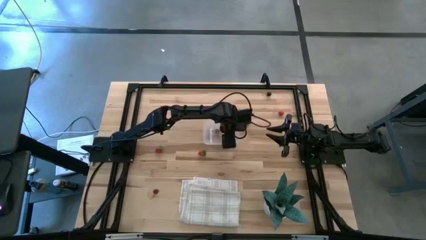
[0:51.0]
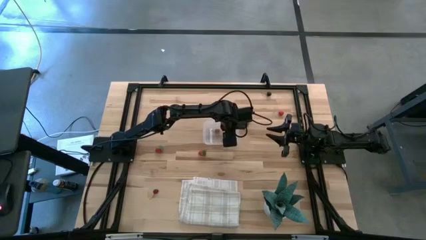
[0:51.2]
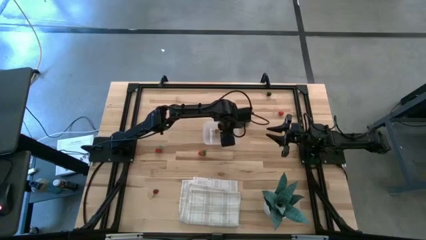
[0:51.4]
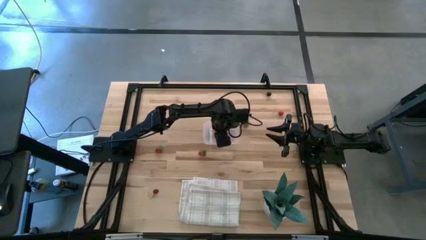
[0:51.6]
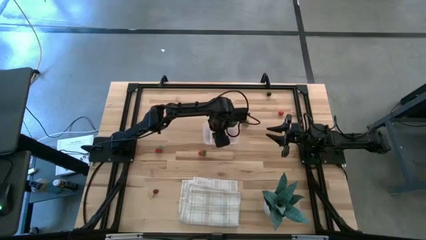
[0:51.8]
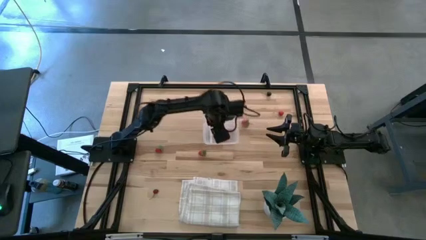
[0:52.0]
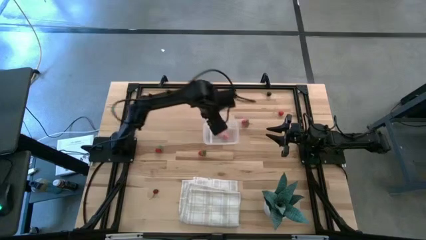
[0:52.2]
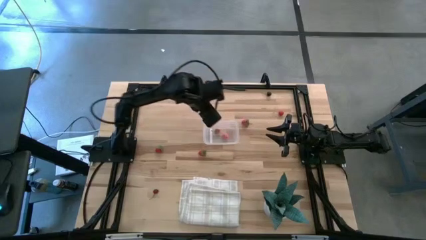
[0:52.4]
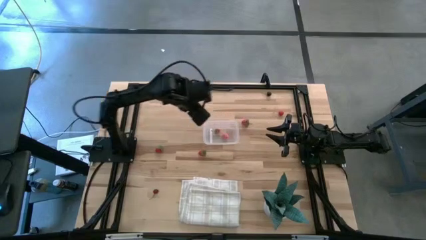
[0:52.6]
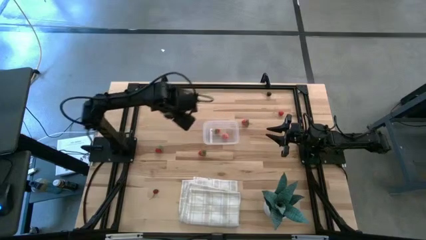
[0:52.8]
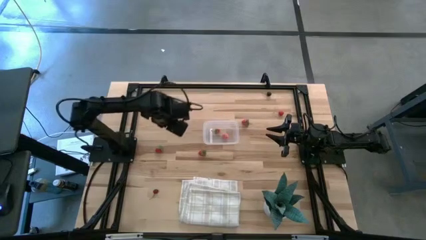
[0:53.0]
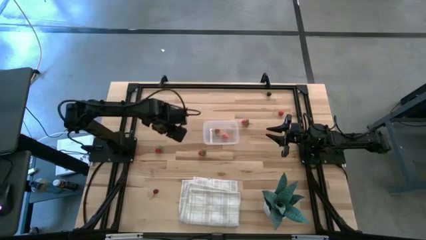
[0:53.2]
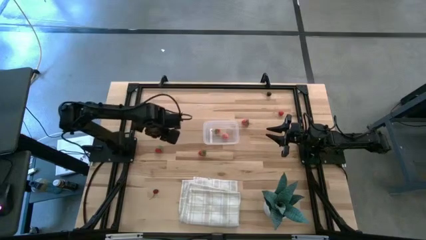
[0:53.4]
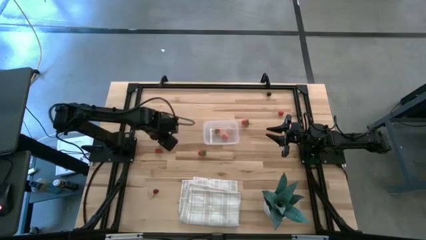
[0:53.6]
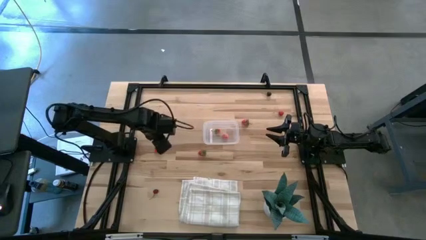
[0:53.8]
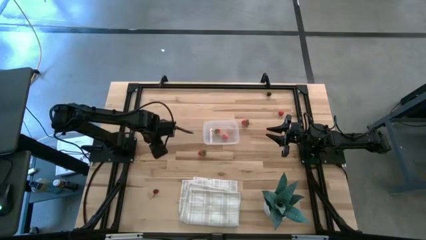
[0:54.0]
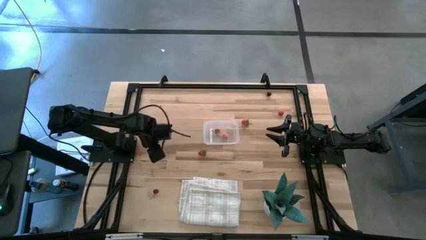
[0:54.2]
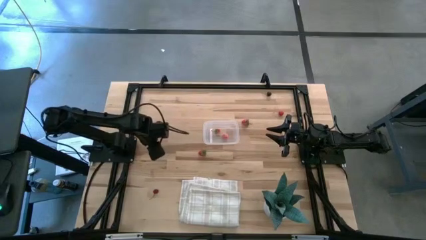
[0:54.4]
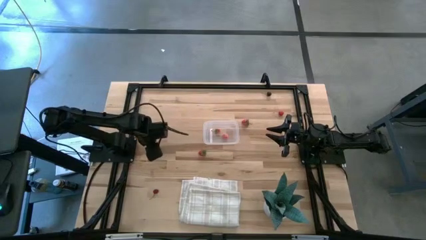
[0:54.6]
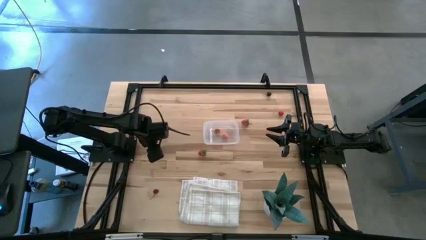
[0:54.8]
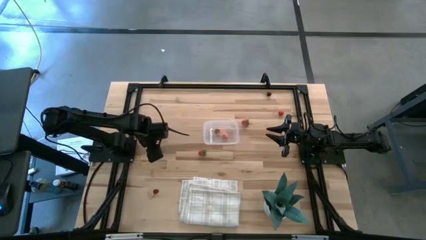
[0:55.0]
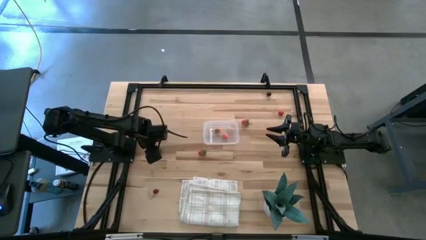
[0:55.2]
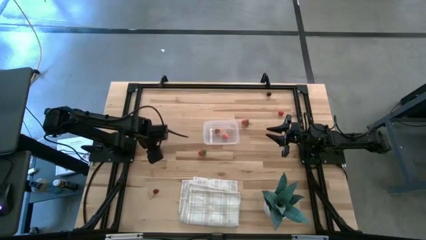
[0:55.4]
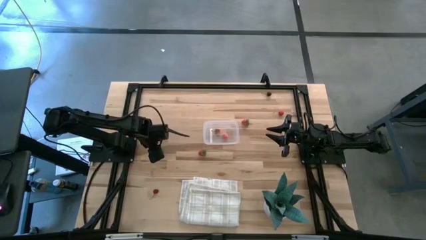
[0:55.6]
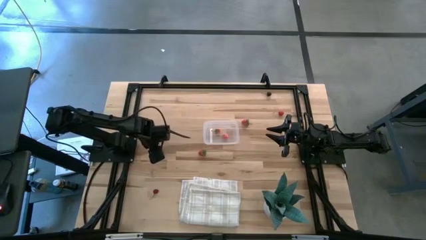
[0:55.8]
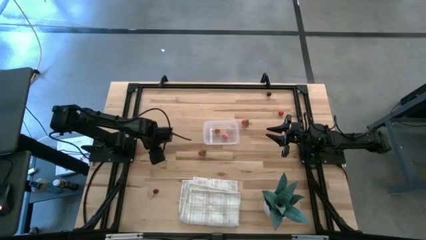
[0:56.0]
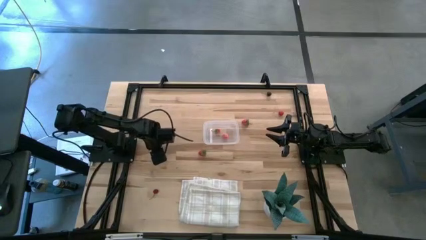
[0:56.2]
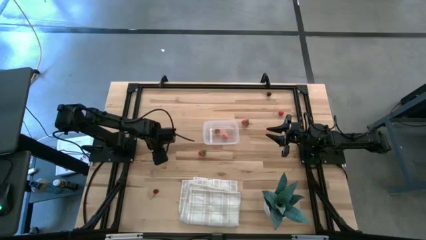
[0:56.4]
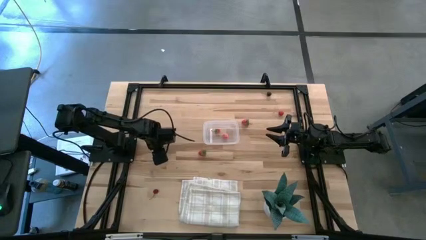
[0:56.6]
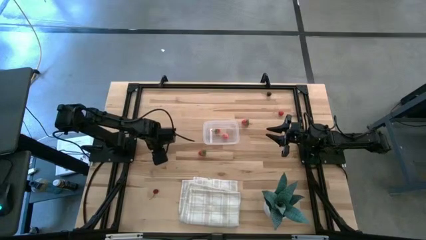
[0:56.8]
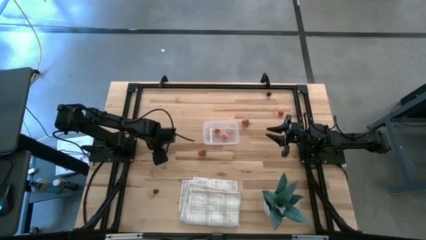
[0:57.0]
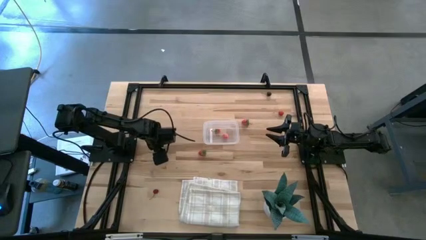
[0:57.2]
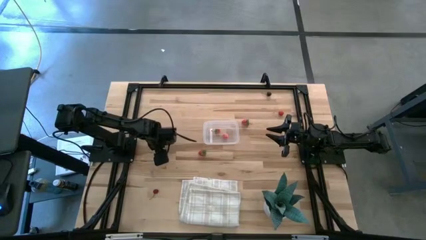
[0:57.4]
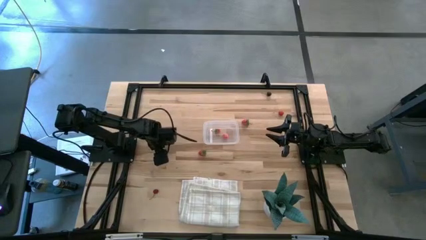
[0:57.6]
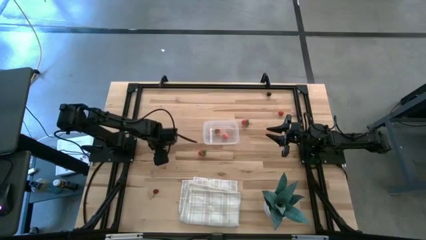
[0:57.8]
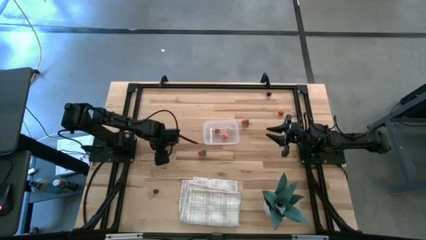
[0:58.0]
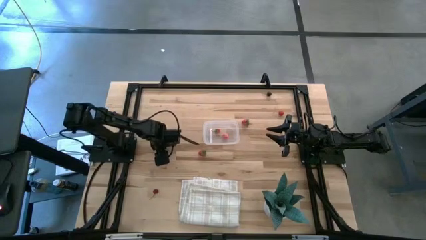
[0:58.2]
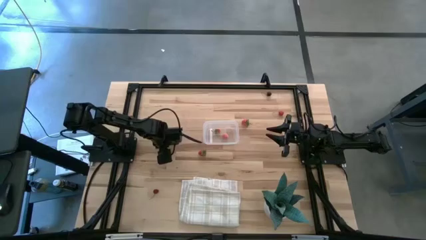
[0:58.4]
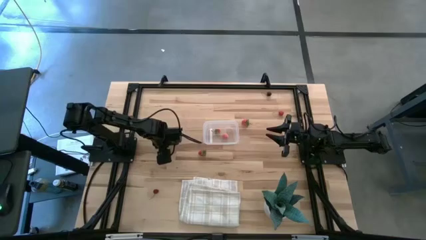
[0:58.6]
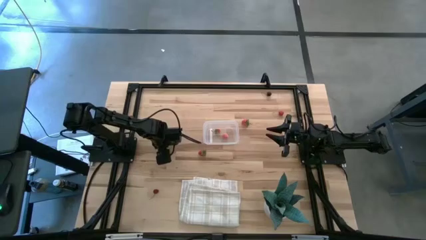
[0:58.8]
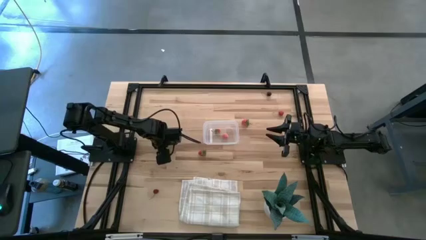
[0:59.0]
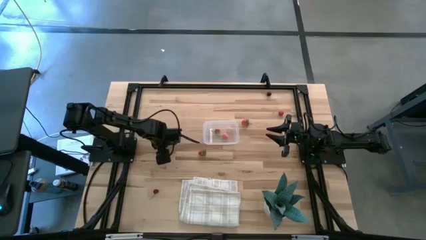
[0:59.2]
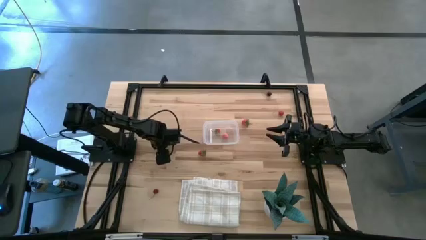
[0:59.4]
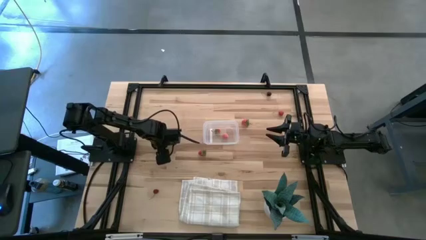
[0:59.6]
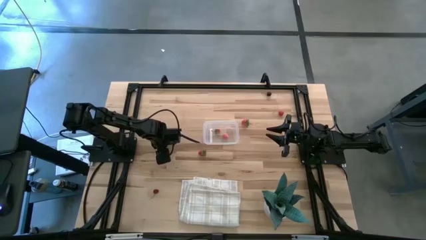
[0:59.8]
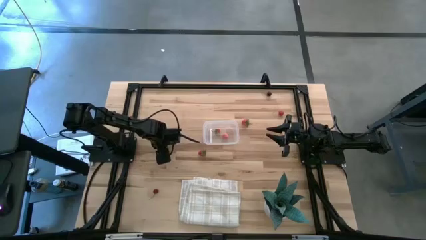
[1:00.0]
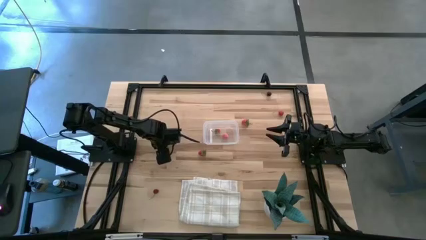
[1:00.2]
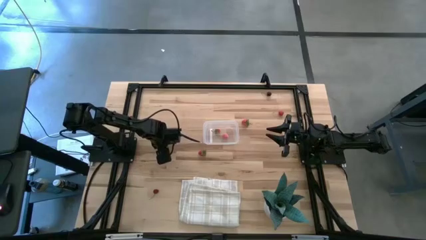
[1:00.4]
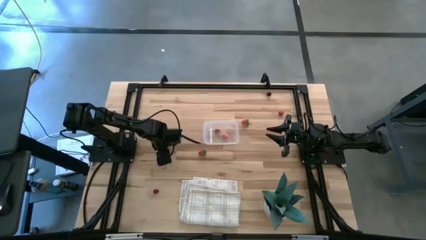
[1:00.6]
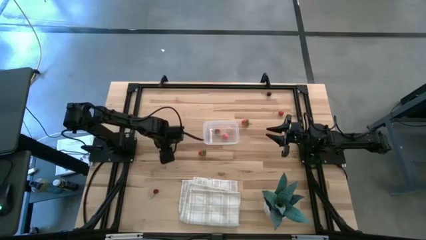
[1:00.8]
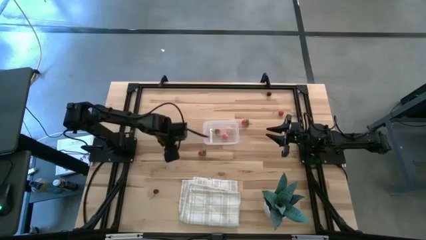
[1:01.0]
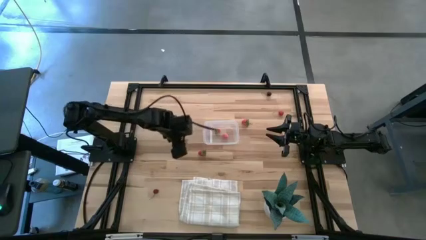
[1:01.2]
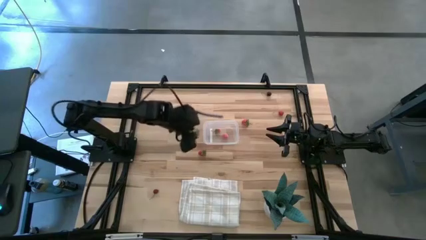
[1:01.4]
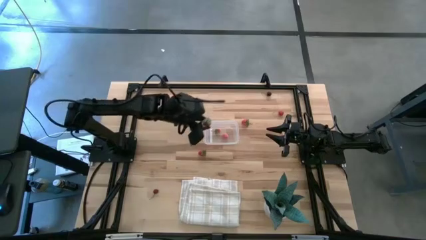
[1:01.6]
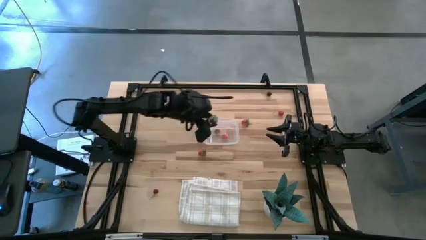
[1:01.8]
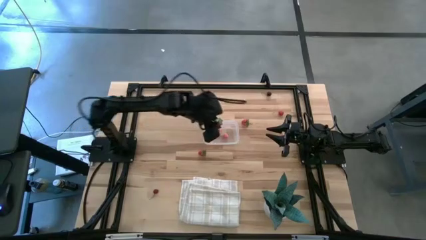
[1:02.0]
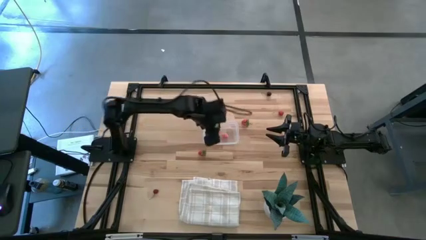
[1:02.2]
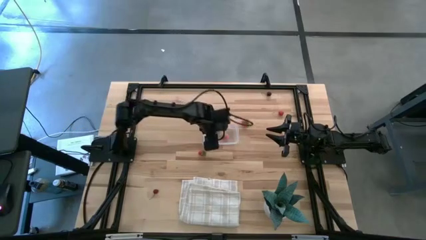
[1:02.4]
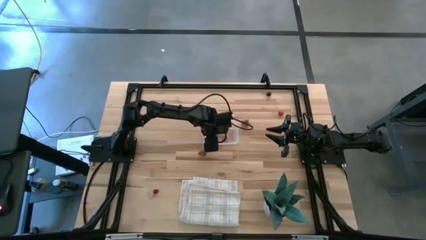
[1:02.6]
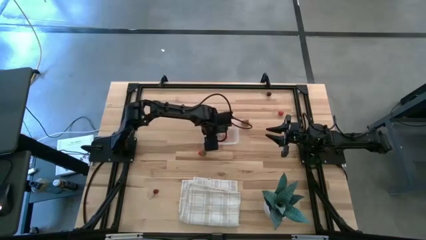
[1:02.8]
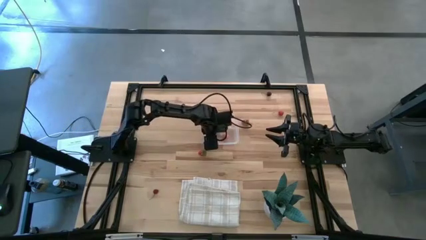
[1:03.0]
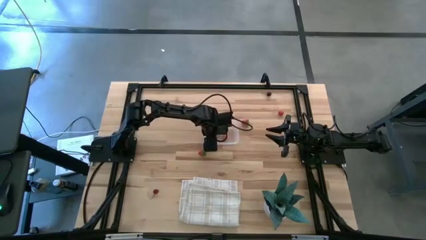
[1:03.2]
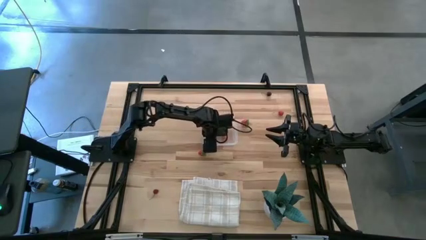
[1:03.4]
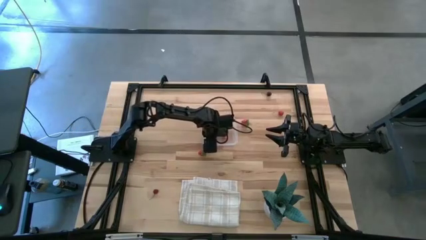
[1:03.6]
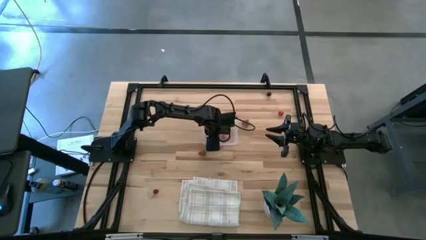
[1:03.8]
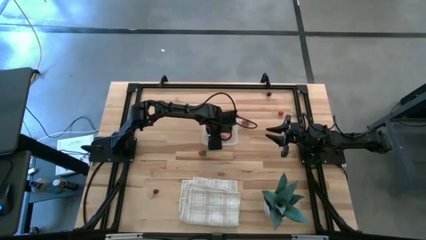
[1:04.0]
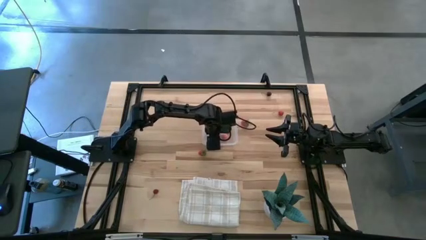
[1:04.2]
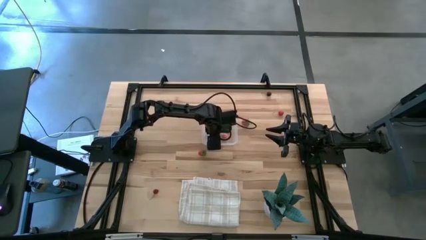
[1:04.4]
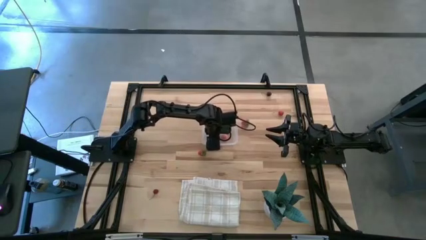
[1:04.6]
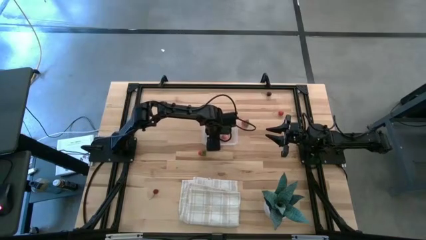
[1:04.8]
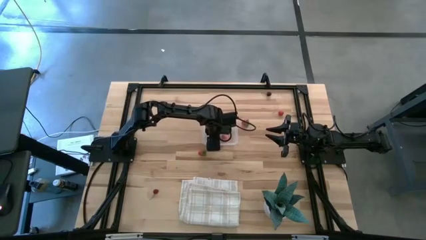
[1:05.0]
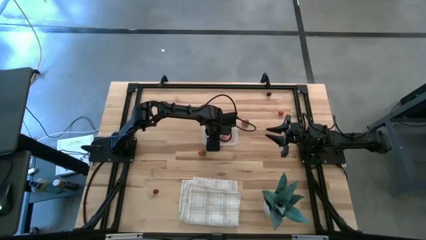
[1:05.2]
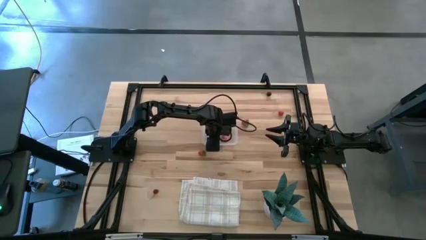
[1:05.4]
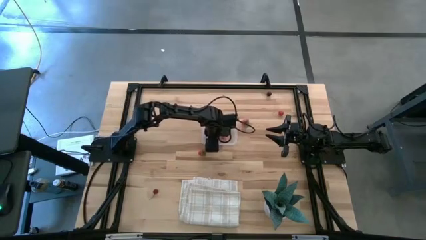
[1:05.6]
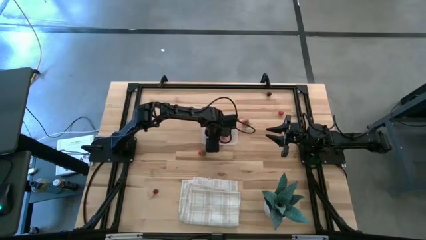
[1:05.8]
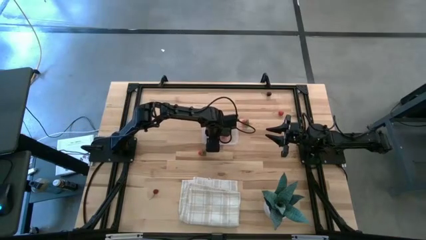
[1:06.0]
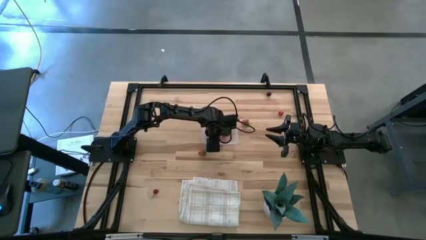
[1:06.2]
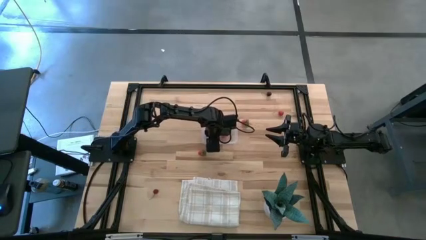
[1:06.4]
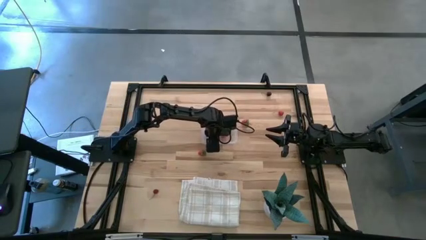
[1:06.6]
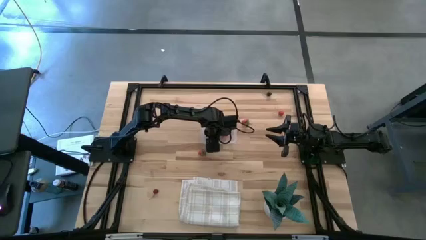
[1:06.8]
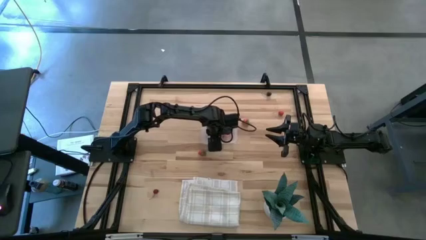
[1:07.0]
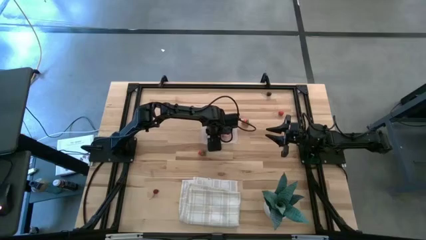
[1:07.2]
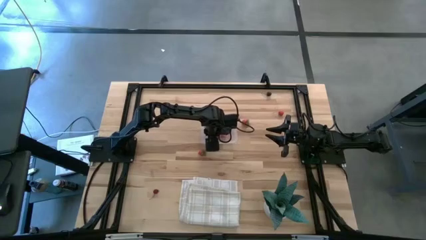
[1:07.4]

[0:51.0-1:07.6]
Task: Pick and placing Produce into tupperware
Put the bottom left strawberry into the transparent bin
